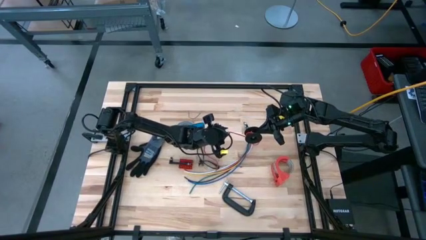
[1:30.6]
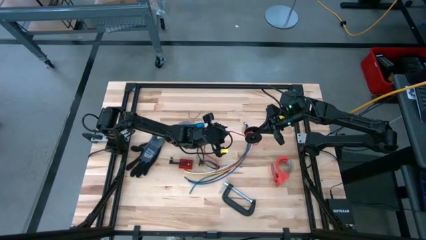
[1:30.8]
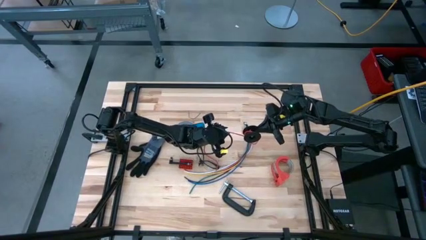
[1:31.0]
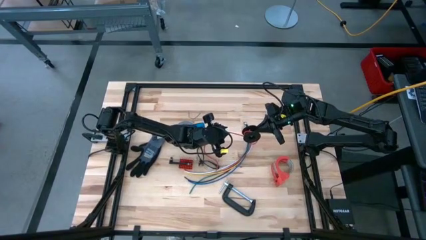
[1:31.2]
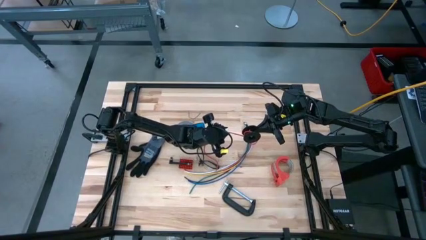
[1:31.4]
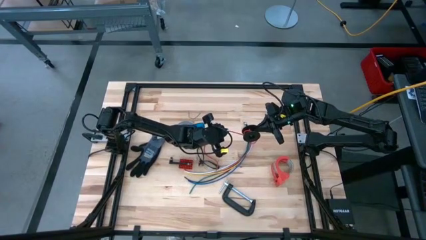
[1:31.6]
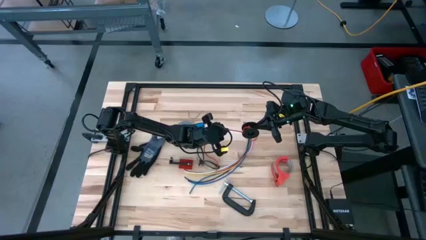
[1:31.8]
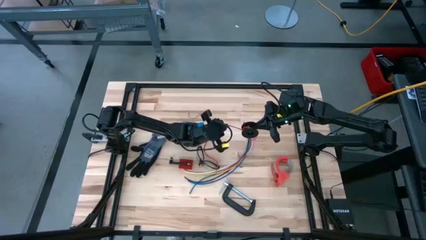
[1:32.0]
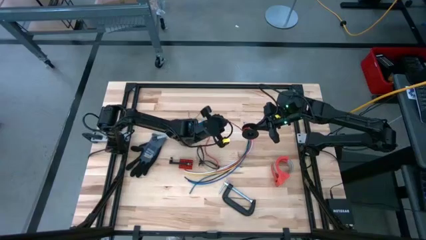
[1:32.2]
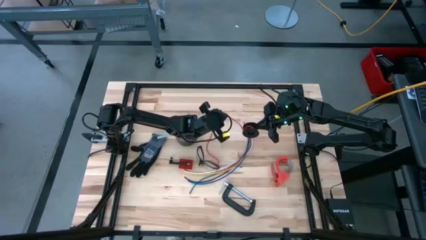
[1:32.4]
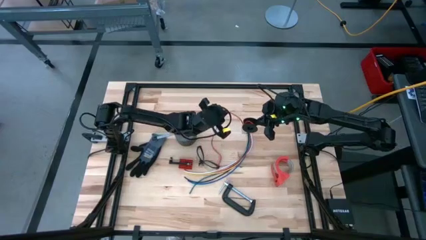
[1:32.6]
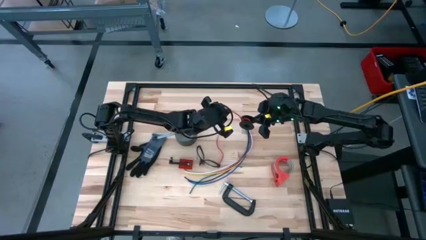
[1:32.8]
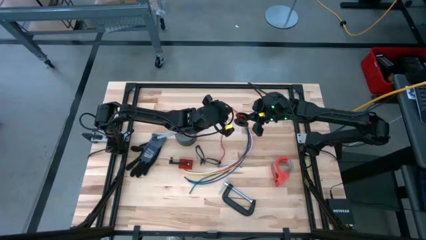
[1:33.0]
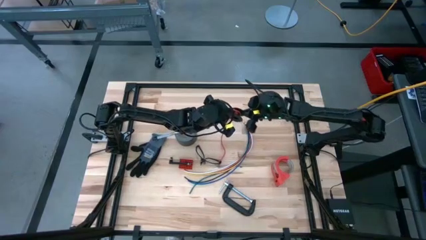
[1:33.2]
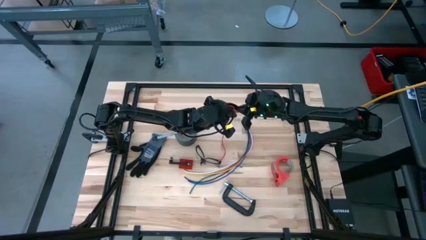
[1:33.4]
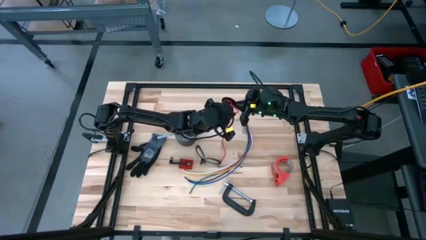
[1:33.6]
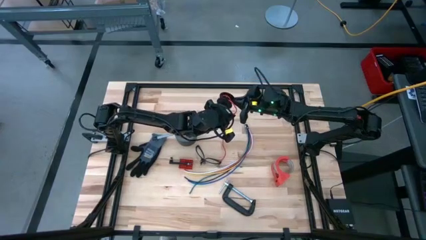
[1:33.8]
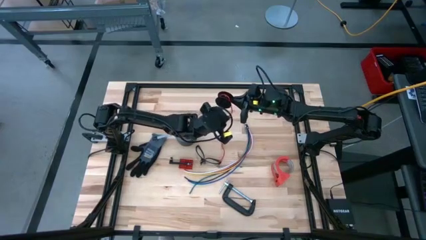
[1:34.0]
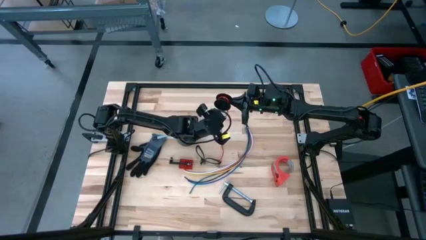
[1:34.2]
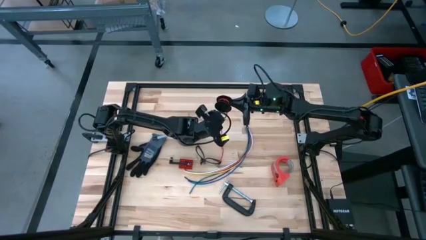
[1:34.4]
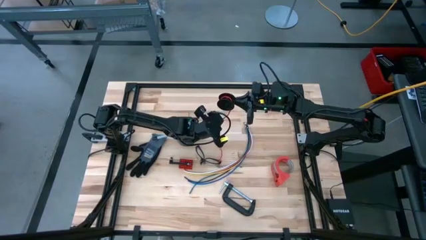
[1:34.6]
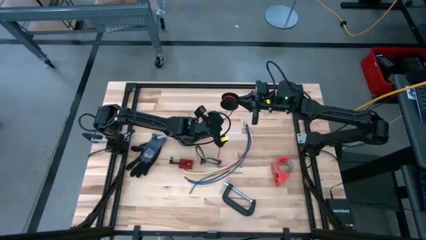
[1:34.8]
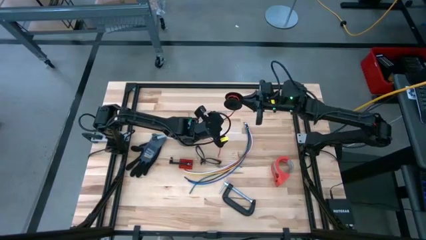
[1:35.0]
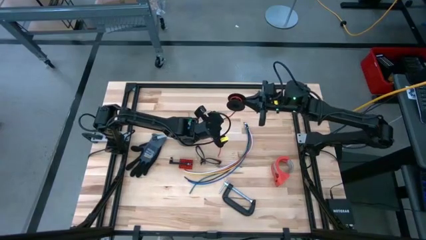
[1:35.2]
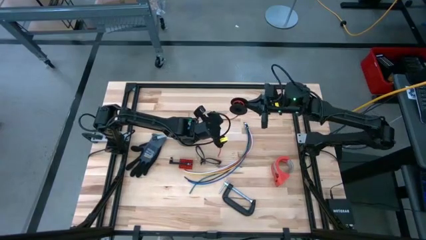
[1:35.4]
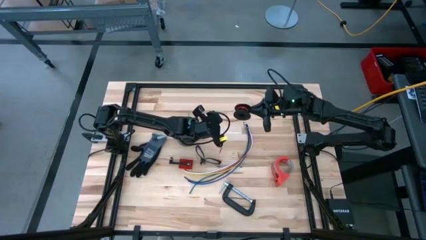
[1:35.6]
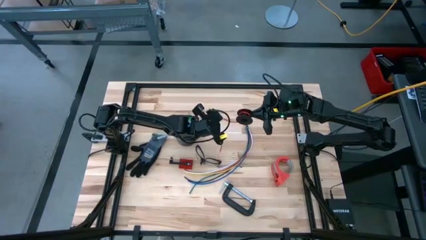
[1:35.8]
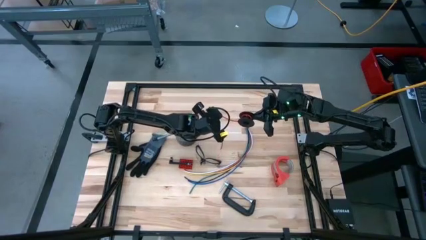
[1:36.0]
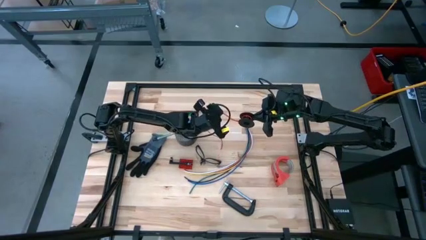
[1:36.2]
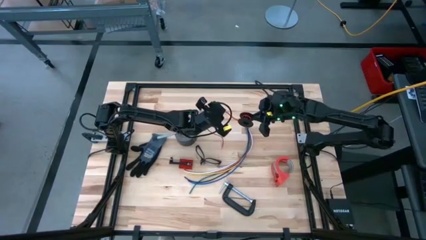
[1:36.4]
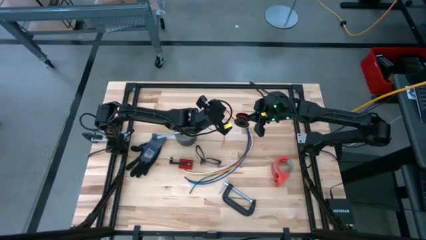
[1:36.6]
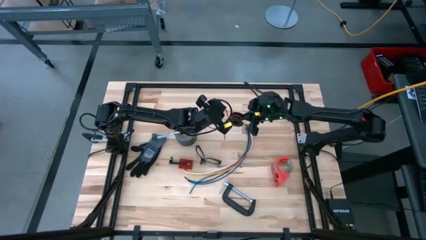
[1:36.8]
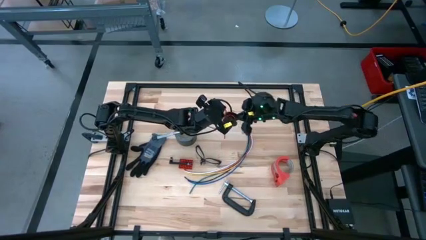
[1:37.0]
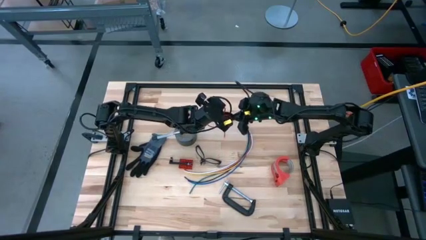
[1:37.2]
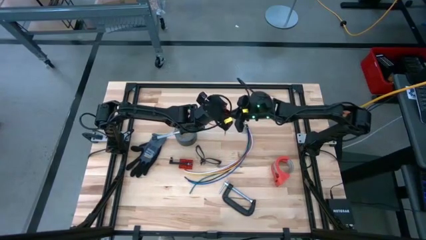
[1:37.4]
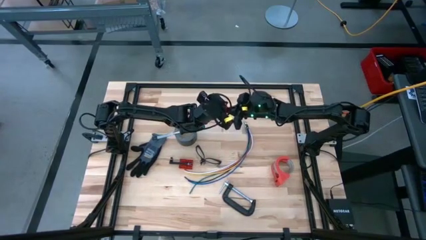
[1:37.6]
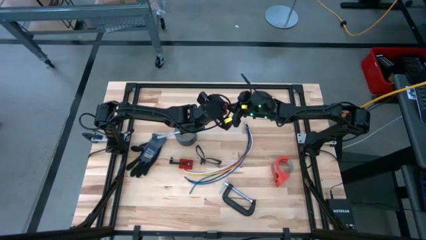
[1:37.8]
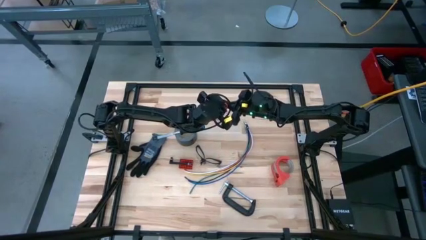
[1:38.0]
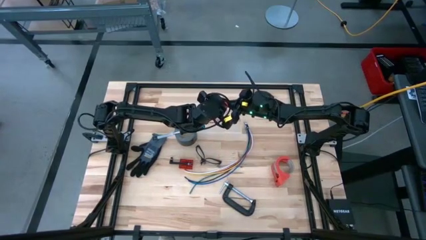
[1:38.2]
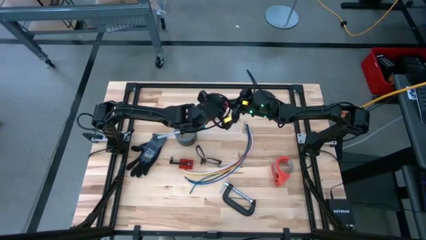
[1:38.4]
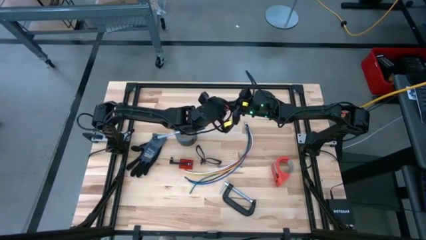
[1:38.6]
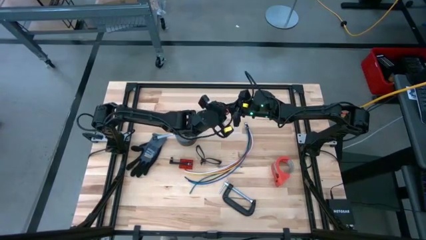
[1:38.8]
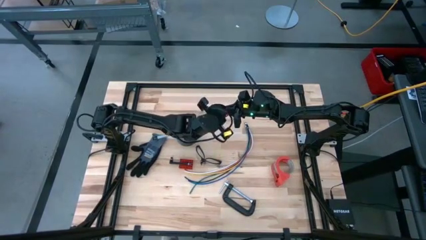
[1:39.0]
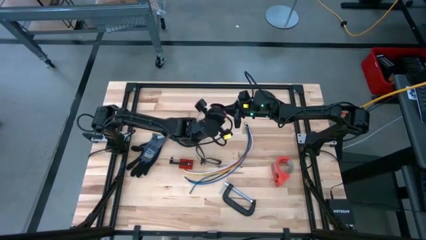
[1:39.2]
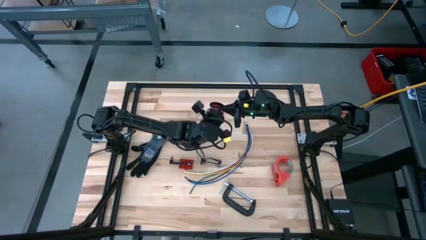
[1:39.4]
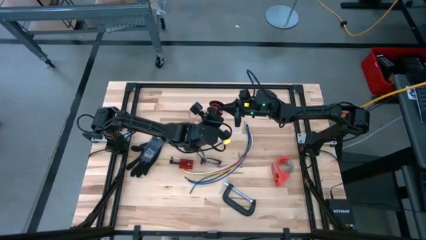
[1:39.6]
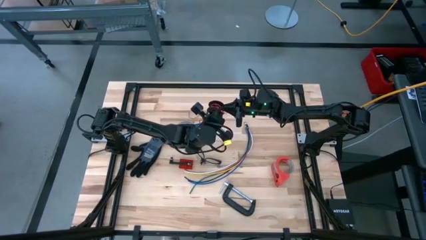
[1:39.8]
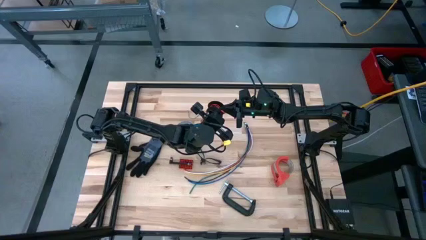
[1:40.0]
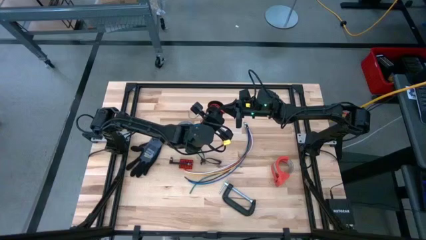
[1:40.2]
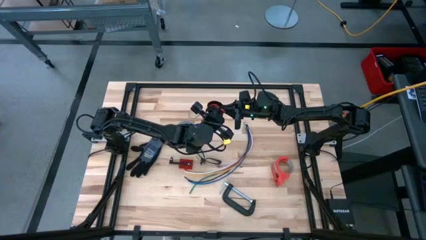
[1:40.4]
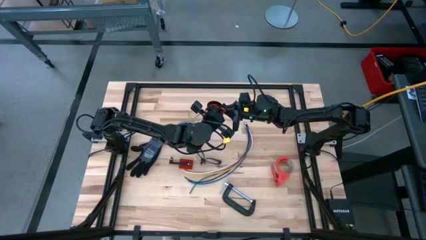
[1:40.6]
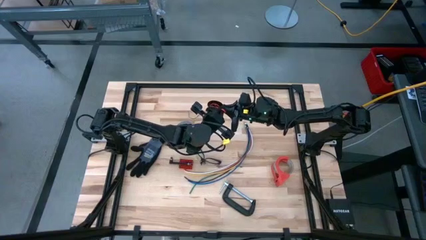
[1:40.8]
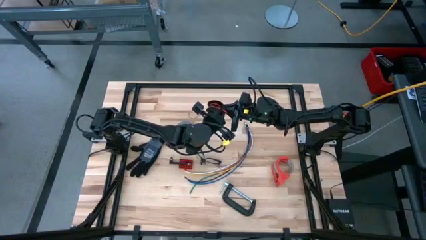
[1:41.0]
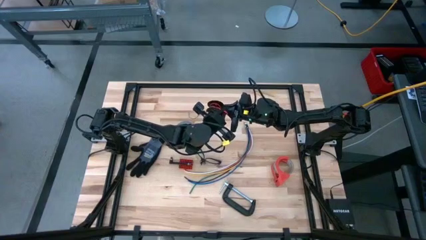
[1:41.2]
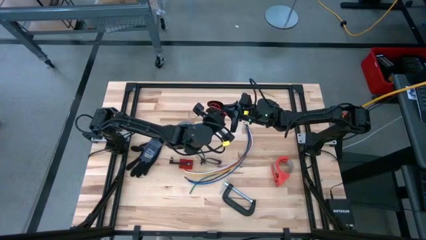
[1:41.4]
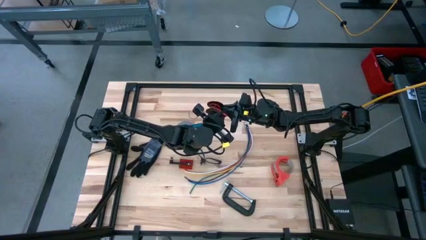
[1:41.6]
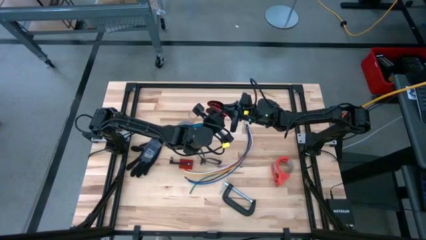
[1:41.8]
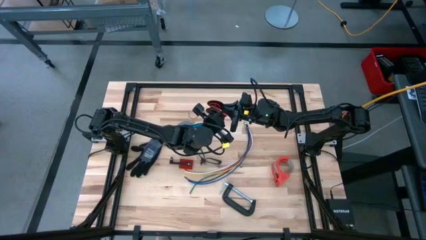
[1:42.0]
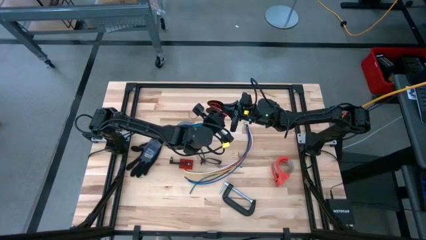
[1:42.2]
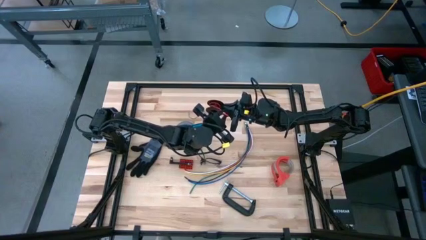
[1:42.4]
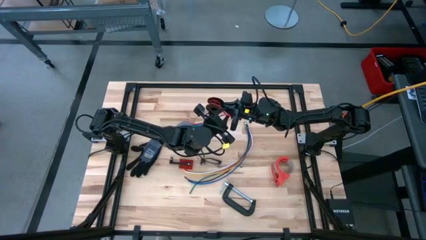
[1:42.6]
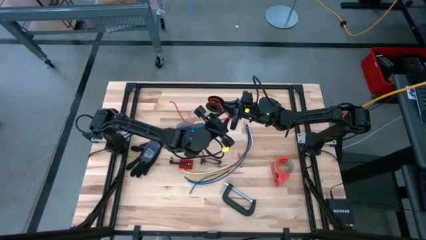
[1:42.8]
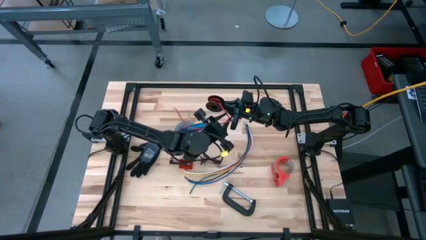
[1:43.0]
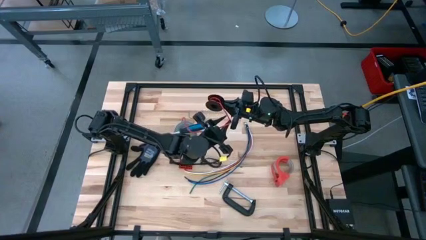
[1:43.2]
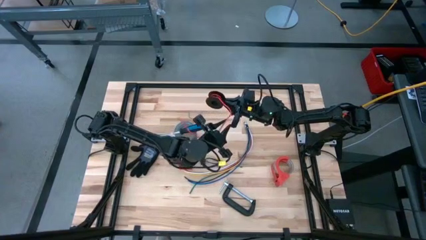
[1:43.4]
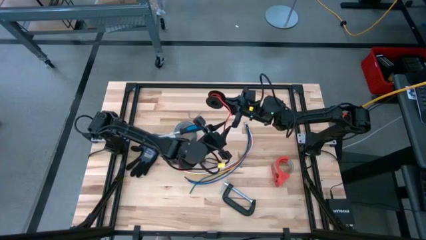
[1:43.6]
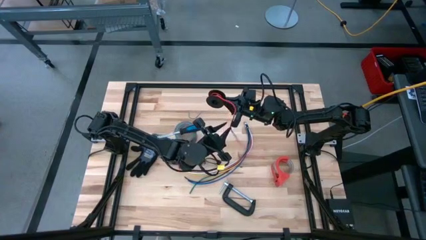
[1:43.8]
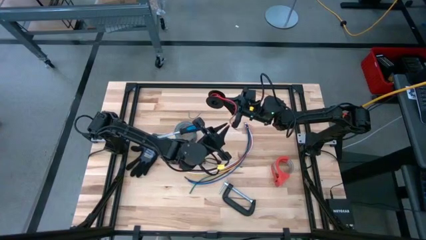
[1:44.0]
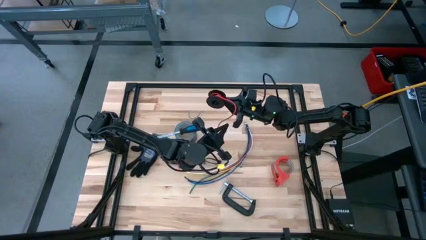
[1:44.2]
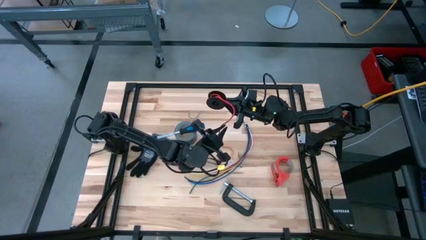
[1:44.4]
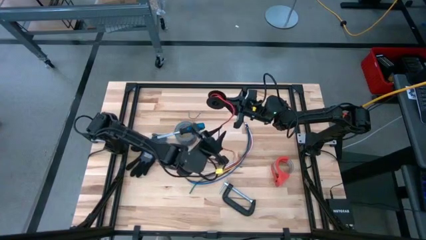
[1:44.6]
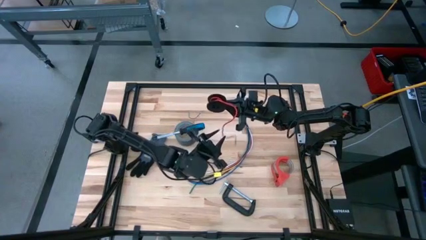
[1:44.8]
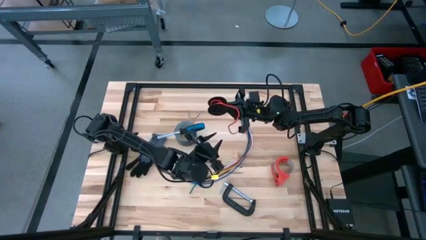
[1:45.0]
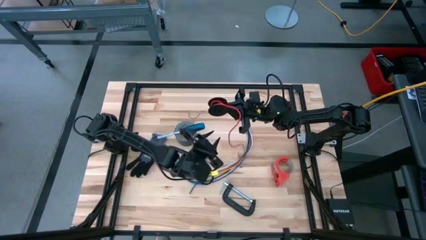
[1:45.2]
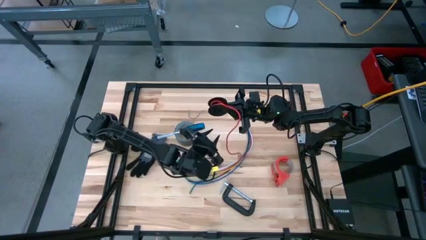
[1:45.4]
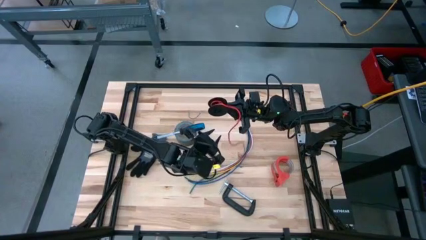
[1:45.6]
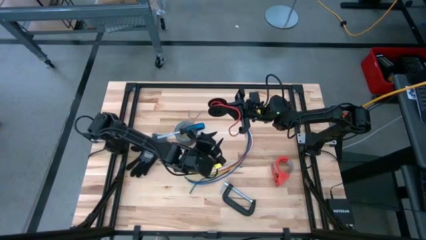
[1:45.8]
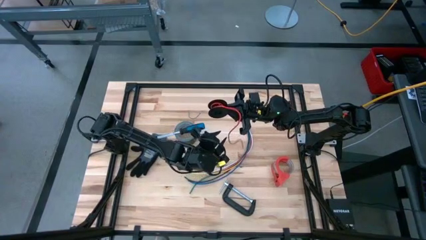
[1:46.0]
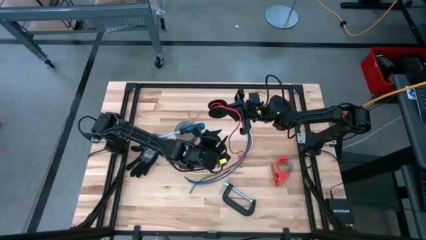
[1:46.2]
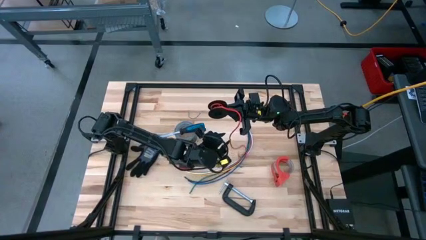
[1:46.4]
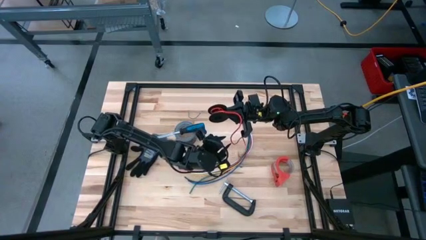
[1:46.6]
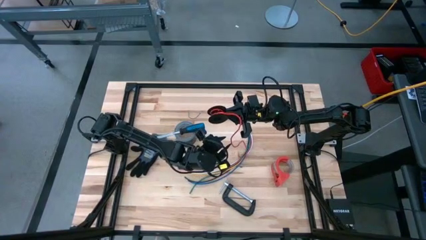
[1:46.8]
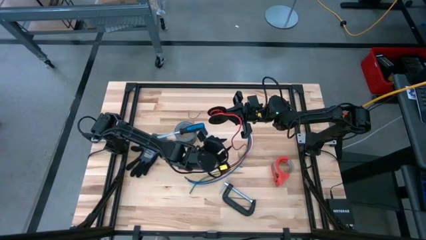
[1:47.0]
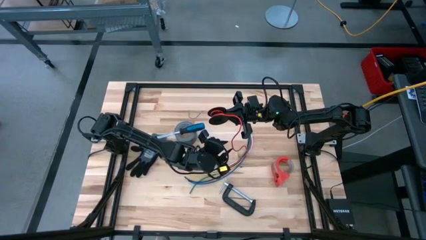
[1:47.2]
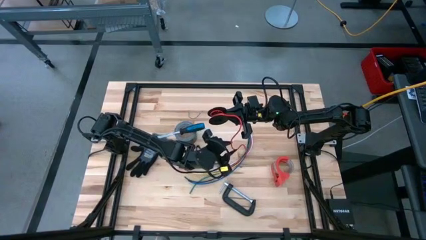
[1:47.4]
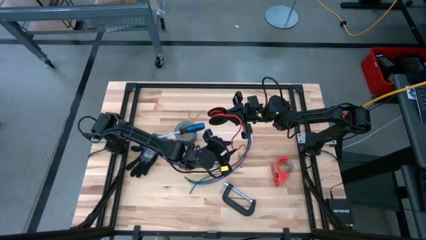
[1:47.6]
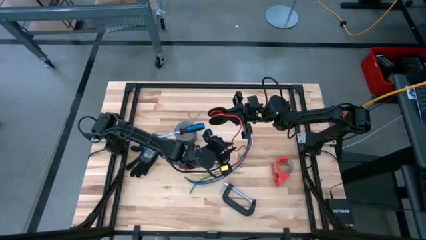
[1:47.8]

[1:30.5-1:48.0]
Task: Coil cords
Coil the red wire onto the black spool
